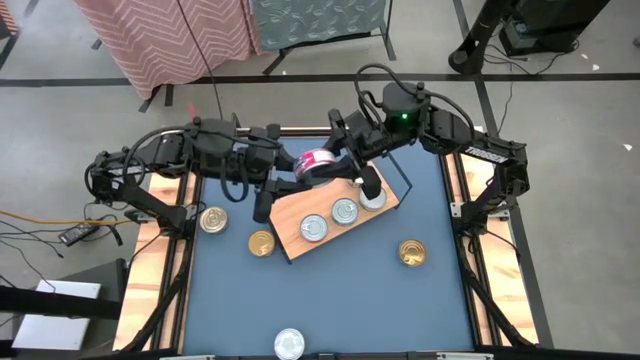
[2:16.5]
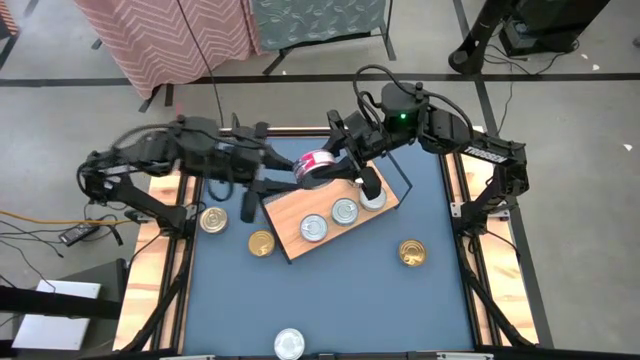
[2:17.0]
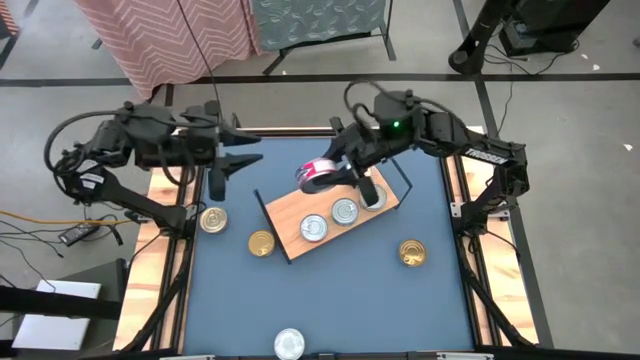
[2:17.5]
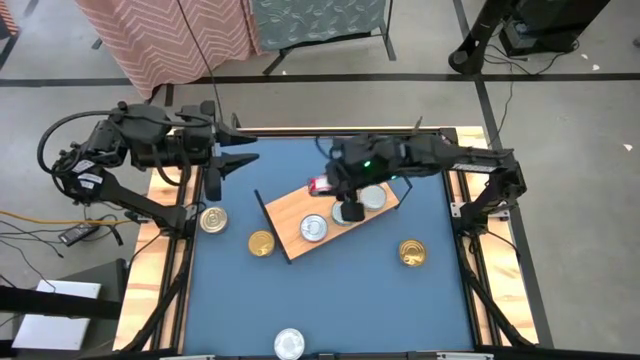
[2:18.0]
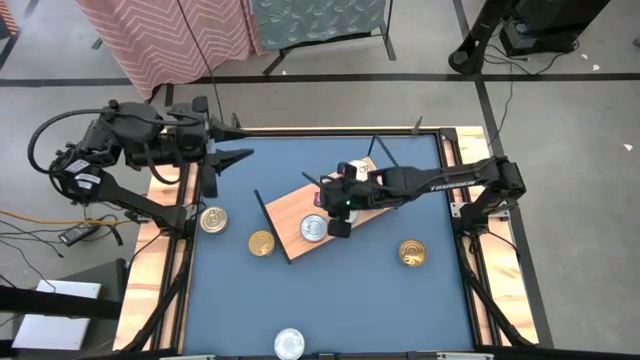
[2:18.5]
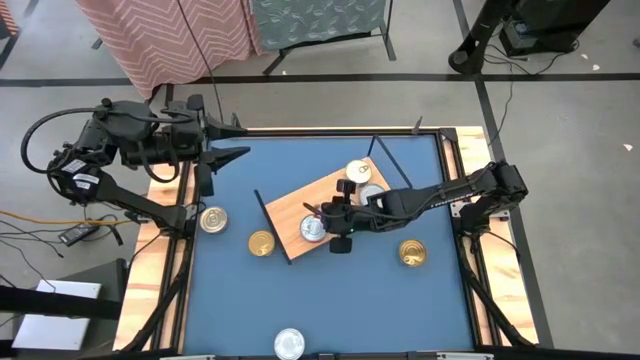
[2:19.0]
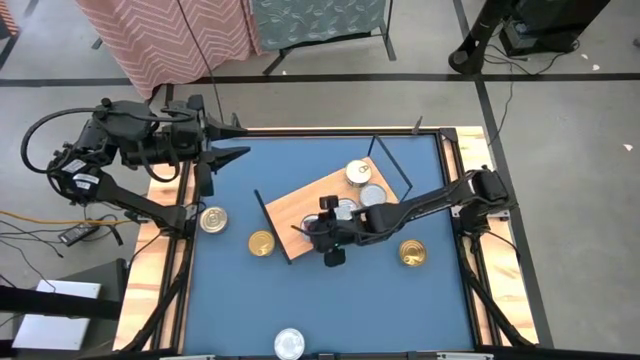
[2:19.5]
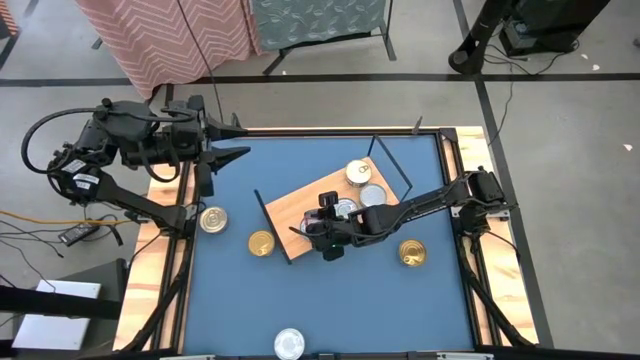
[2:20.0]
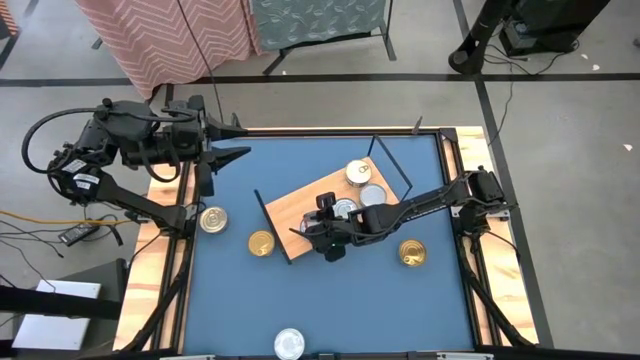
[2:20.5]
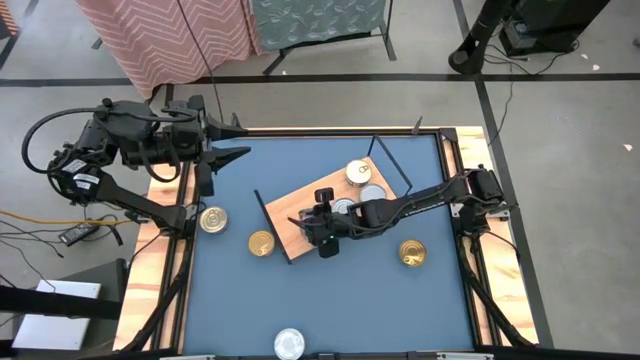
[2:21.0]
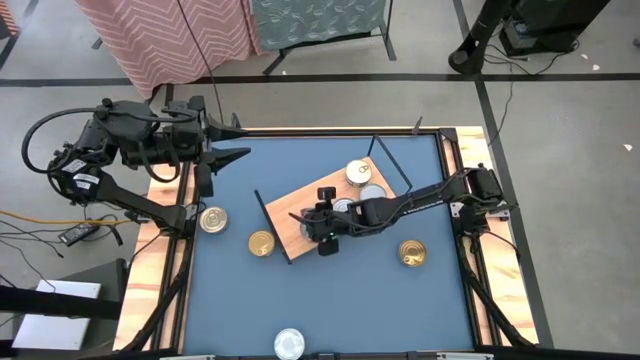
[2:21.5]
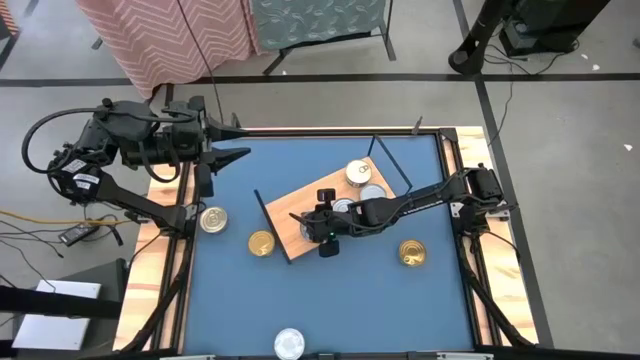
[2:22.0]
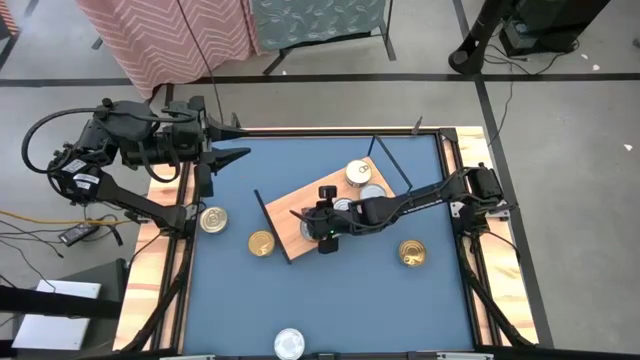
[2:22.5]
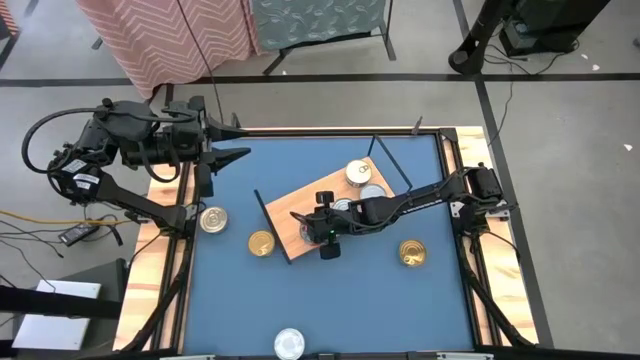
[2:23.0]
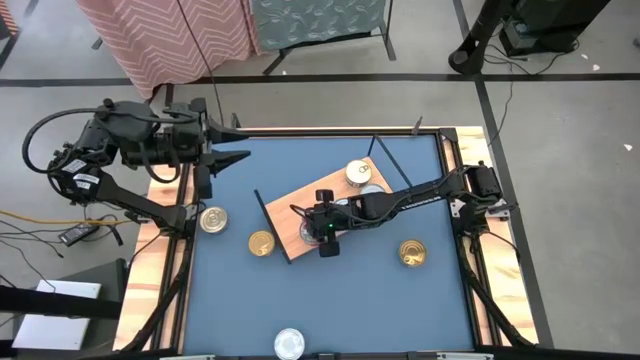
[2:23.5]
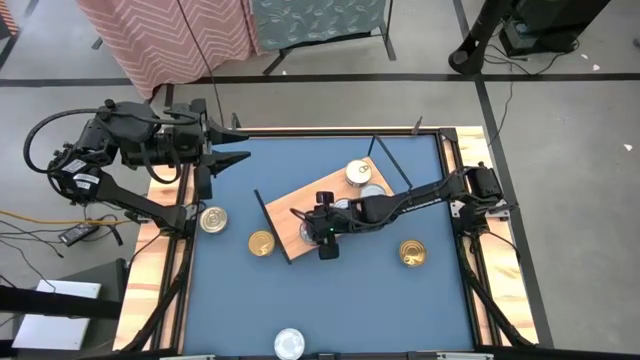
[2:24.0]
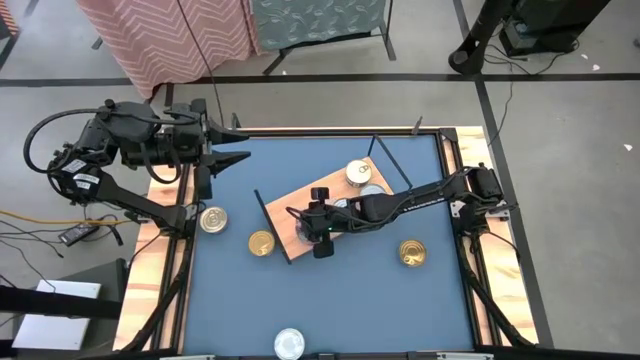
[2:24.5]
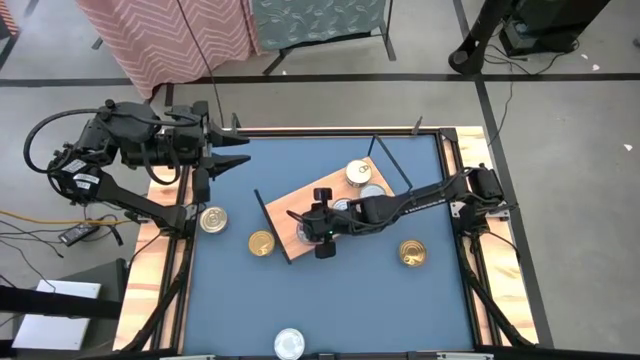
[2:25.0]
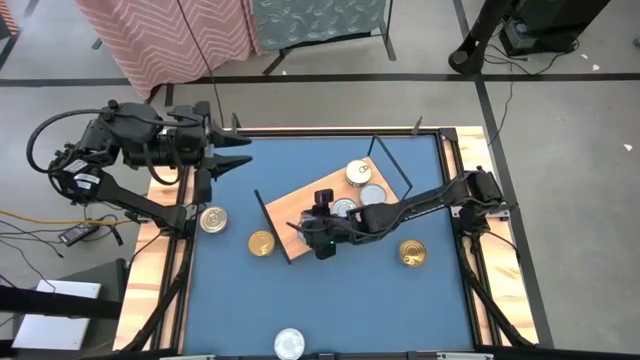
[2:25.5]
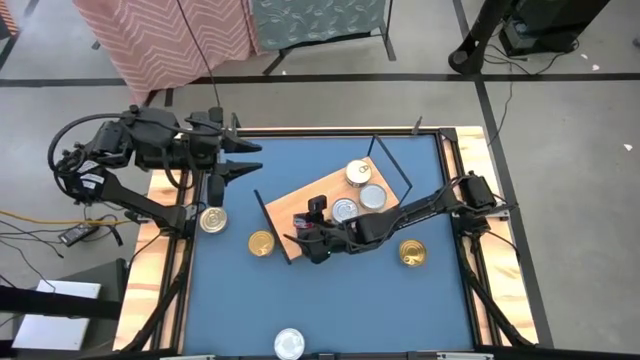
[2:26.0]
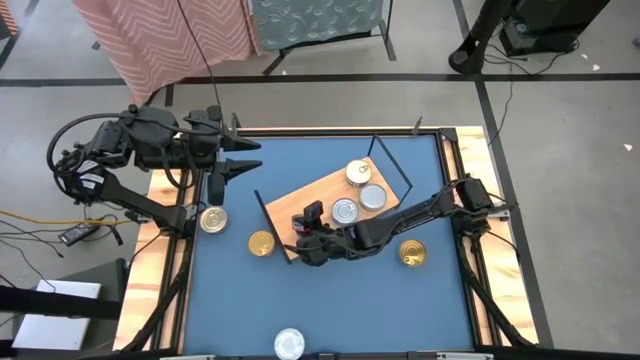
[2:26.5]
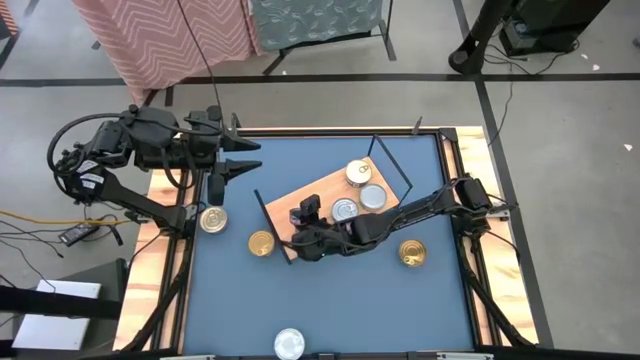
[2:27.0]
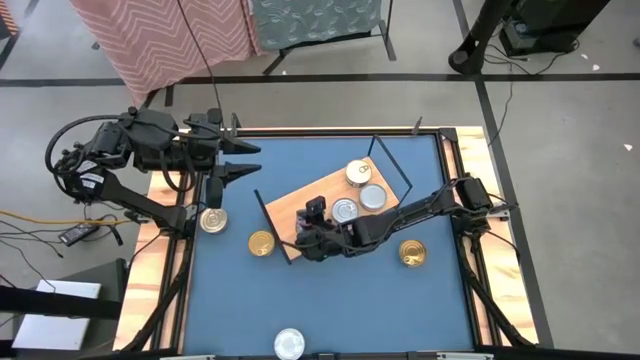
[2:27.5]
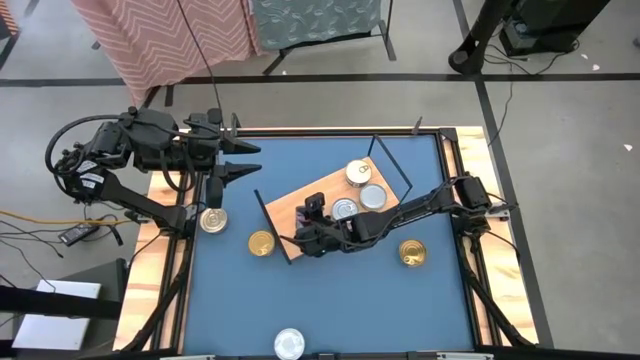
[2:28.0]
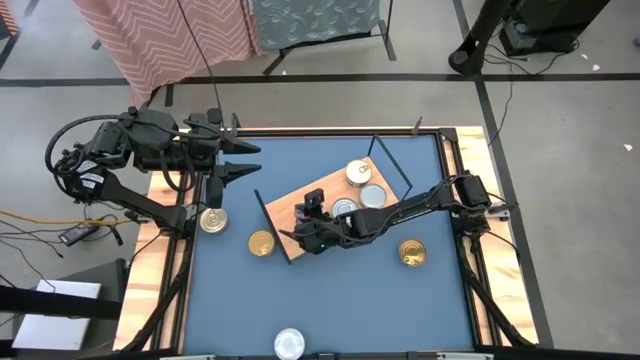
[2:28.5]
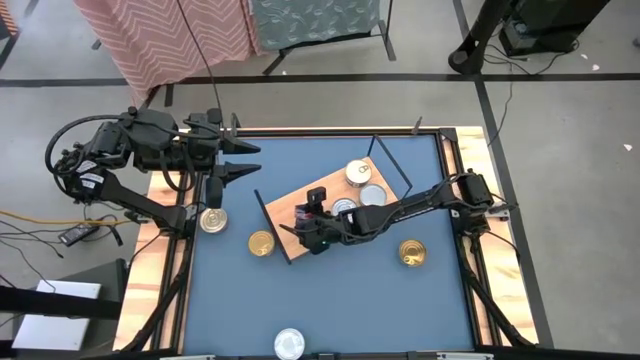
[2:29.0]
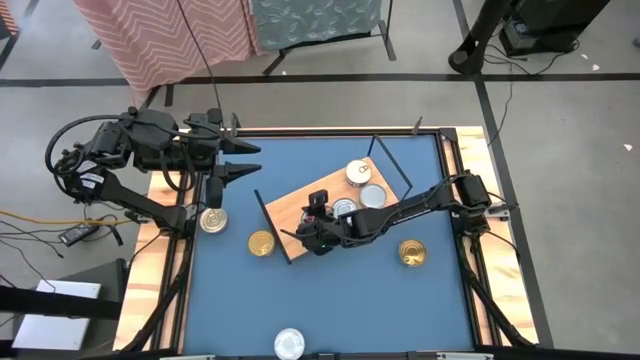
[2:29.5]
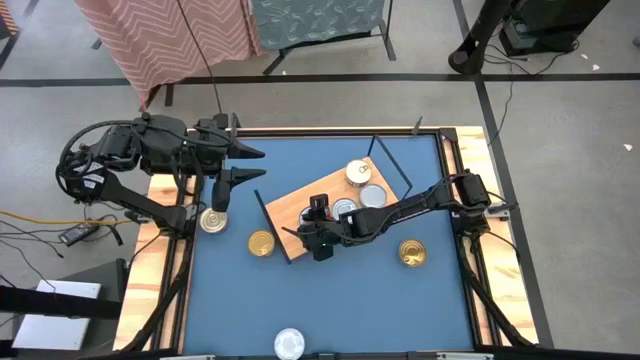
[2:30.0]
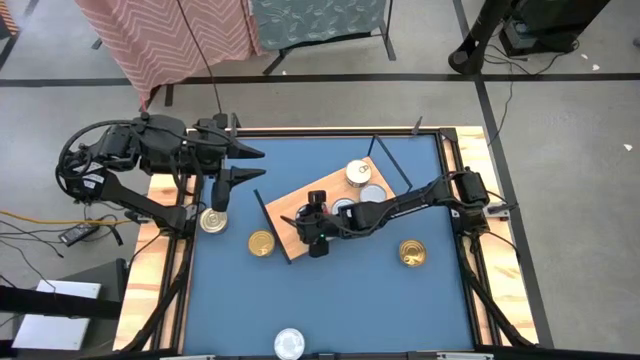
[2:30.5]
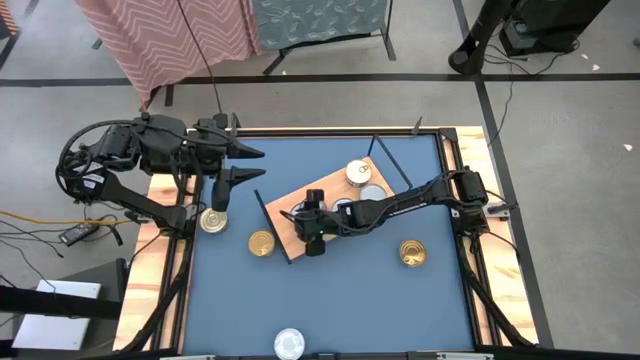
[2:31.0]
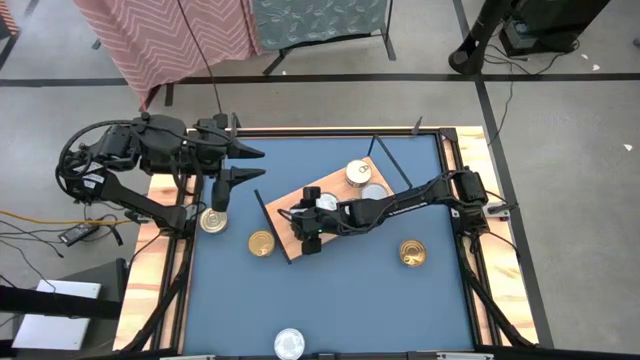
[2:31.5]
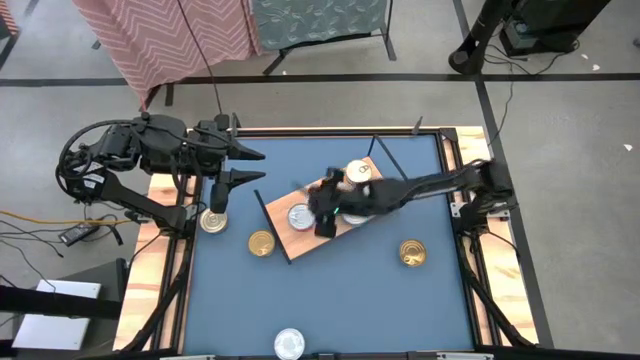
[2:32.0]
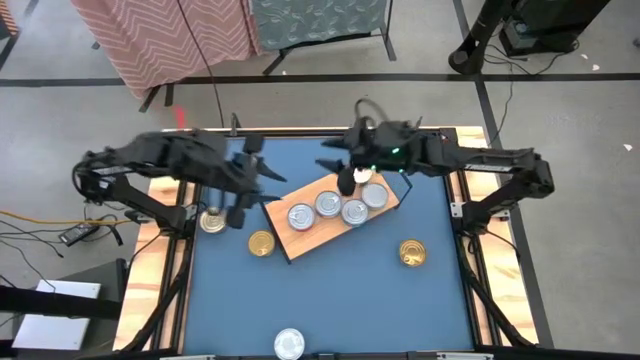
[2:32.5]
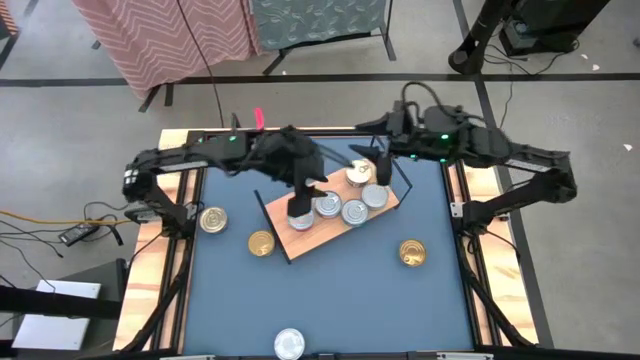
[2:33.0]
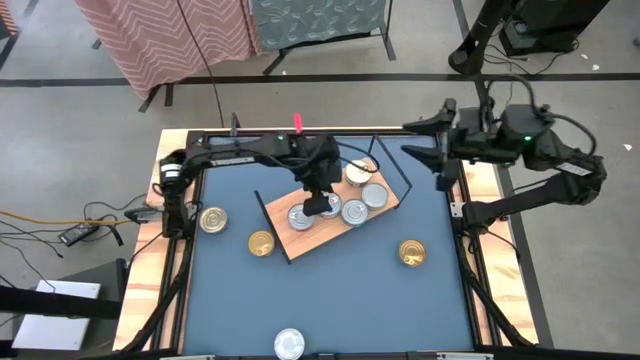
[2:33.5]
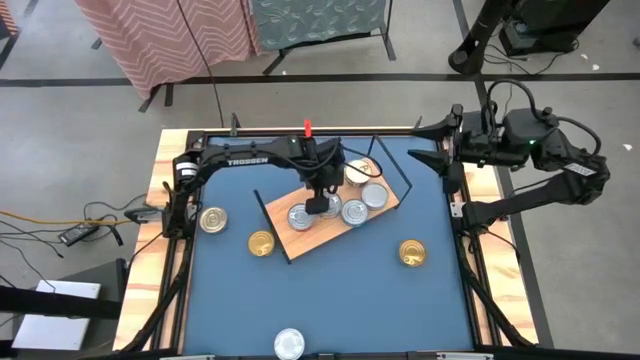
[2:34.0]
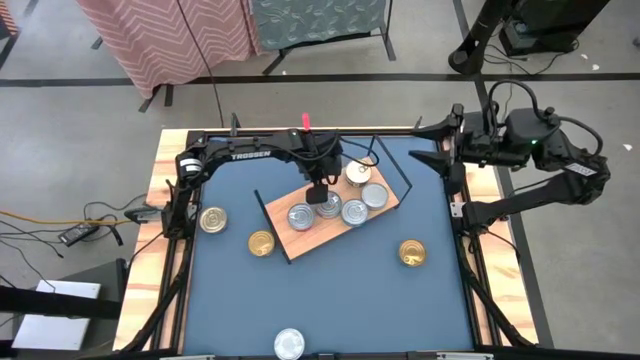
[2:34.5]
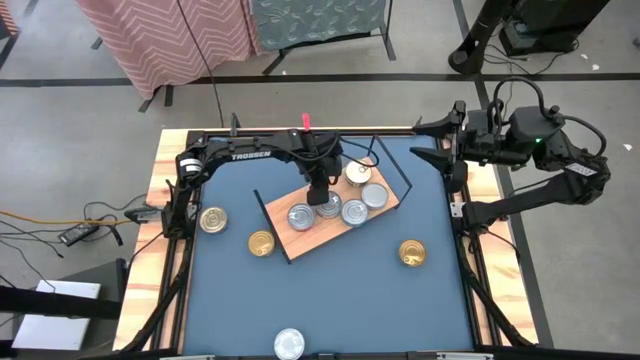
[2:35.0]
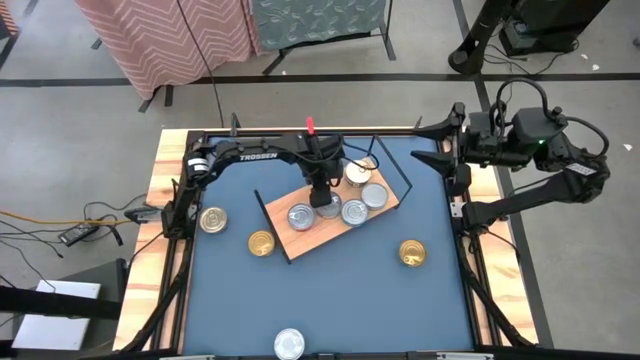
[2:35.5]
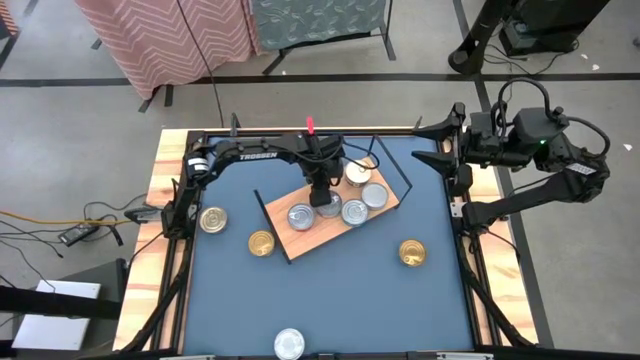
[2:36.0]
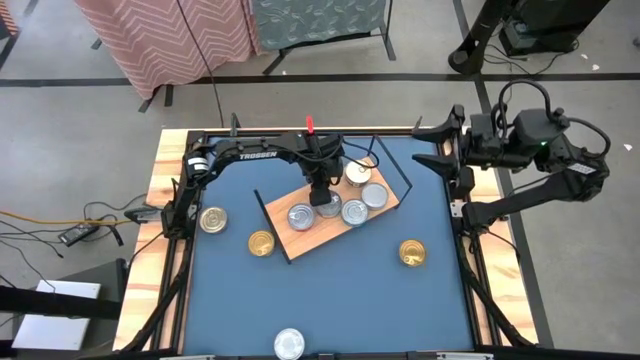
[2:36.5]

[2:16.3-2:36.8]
Task: Stack canned seafood by type on shelf
Stack the red tuna can on top of the red tuna can on the shelf
